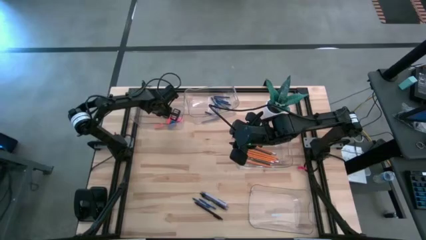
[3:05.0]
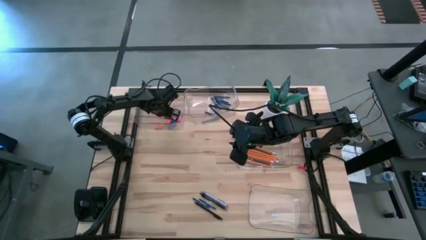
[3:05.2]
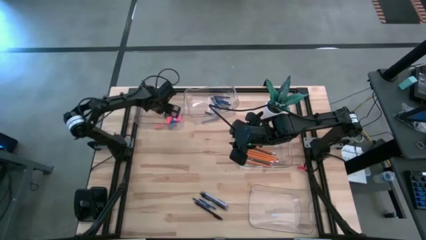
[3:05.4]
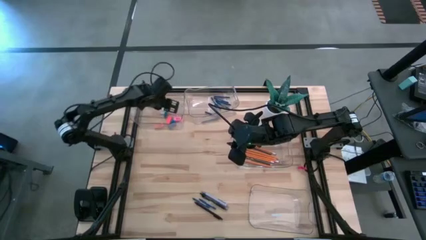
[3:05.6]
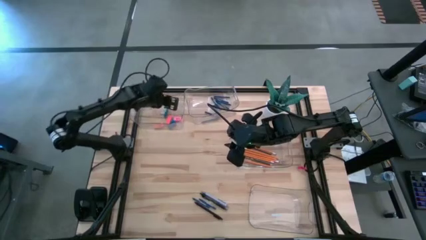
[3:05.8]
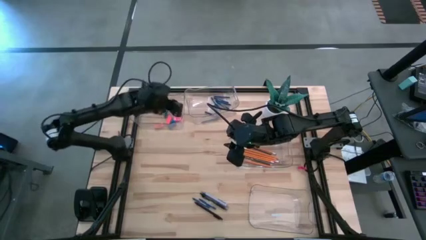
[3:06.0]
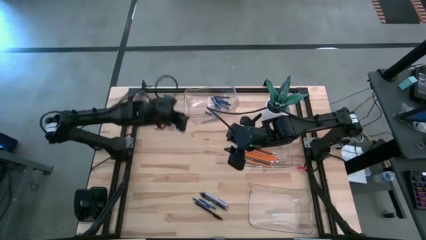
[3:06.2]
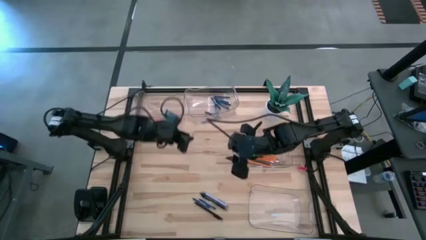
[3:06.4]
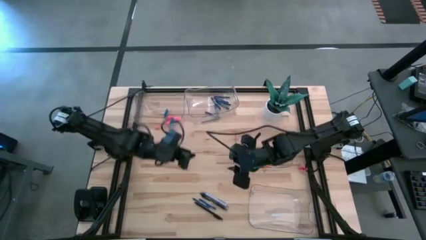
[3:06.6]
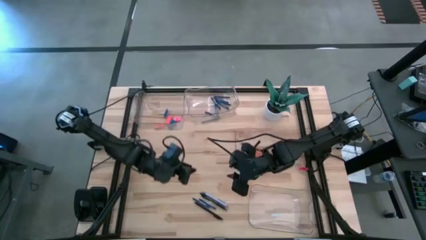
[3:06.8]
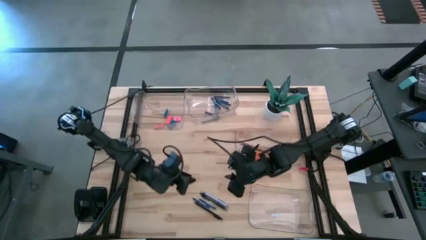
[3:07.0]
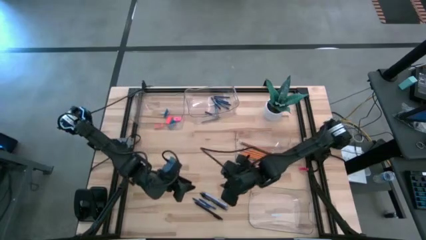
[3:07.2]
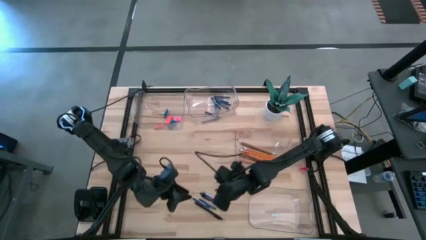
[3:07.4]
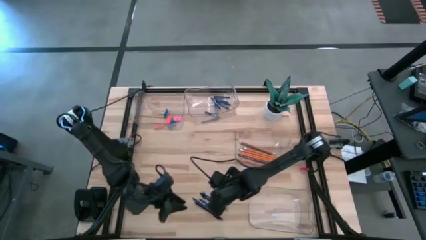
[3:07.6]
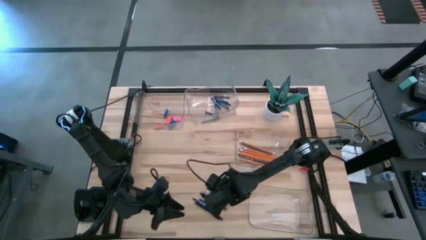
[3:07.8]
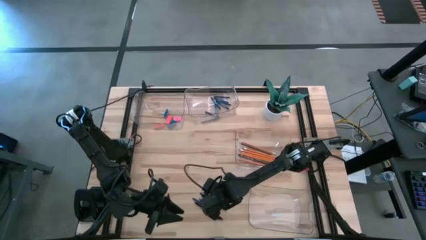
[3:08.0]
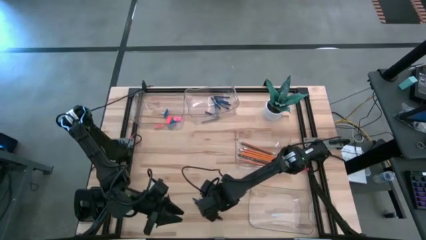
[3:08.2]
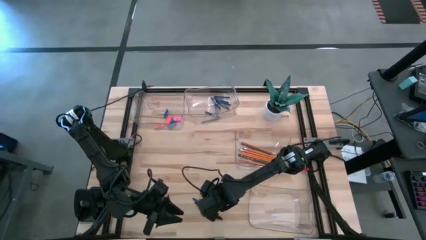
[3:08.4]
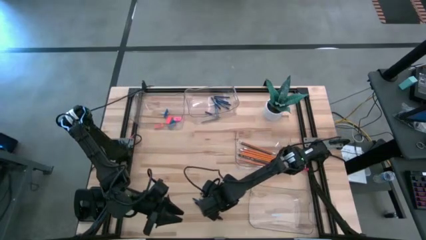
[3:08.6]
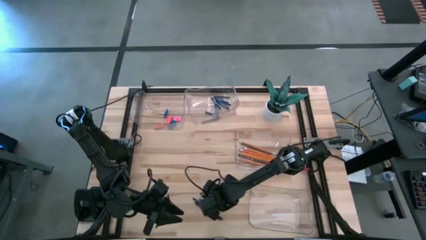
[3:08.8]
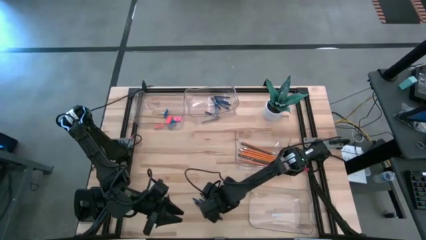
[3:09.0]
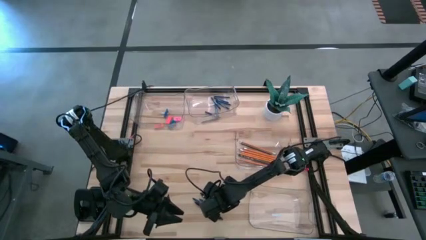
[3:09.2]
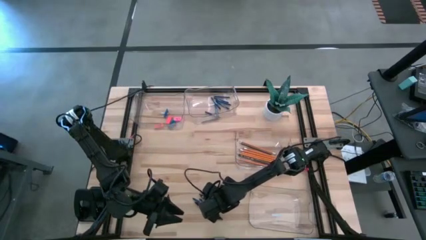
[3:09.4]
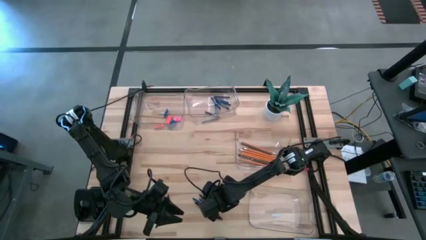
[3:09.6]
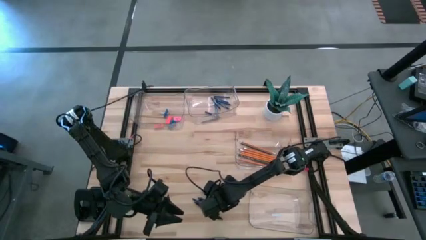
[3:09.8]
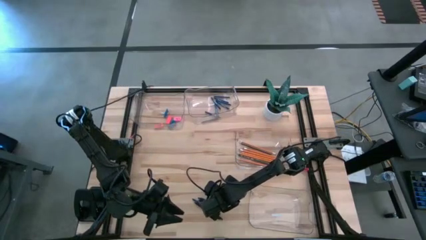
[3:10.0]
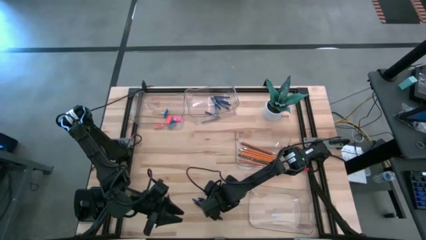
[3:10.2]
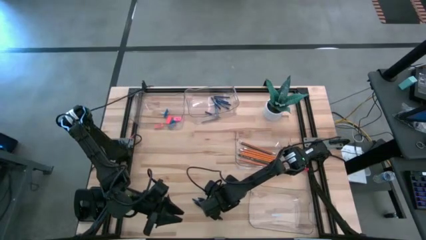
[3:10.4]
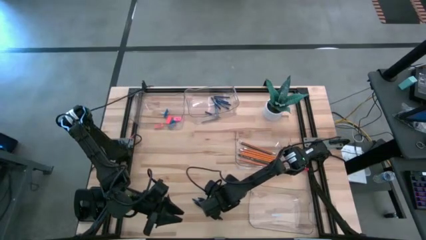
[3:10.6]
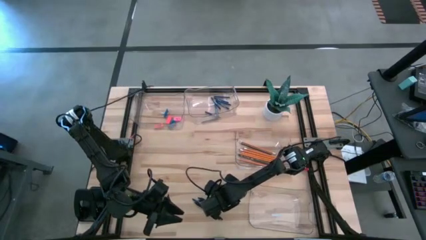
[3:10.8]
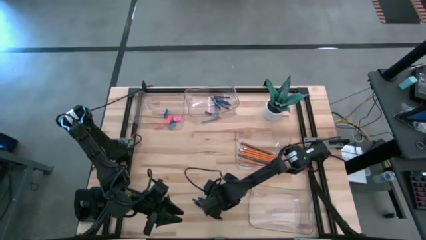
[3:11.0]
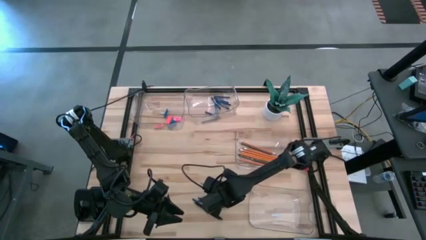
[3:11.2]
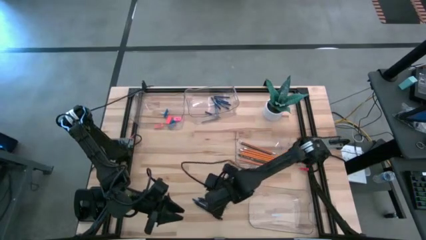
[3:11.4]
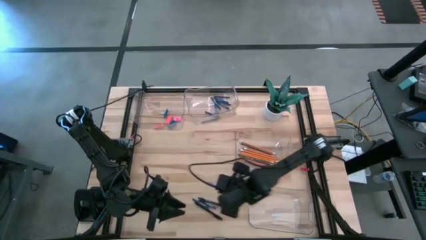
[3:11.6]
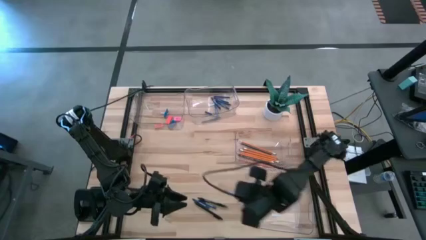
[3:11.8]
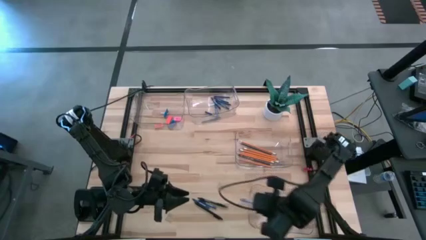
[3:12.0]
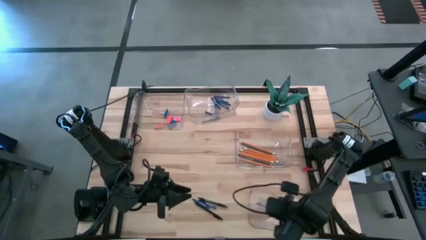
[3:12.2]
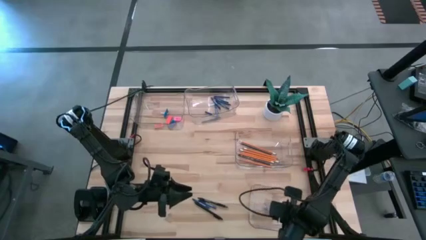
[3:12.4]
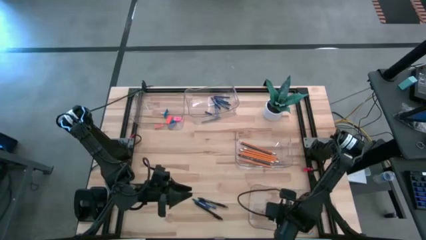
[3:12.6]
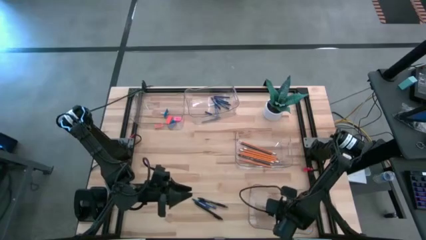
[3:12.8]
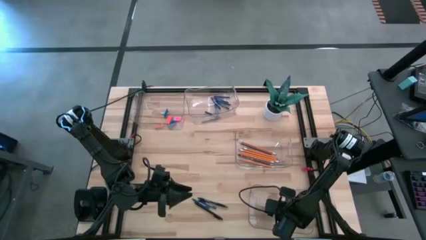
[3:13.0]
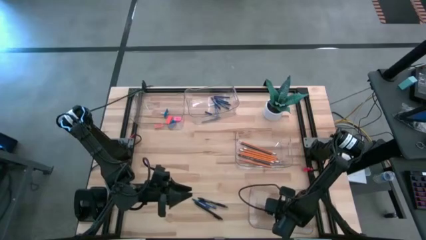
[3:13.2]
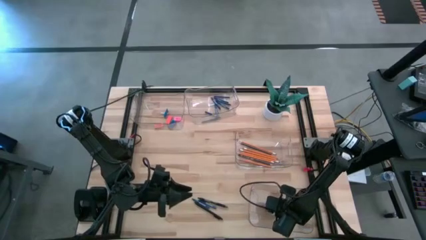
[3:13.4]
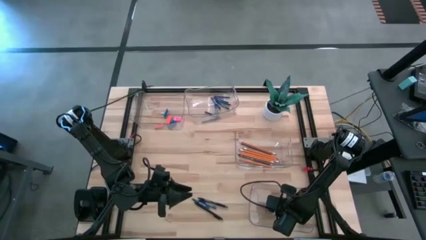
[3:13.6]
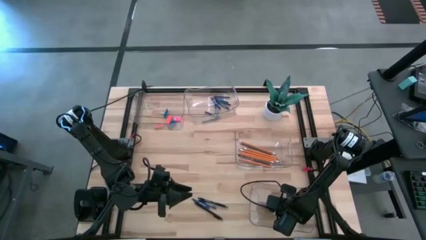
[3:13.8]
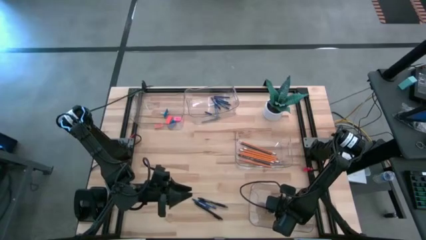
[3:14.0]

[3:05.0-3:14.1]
Task: Sort crayons/erasers/pens/pencils in bins
Put the white pen into the bottom transparent bin

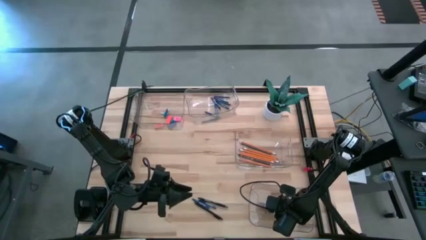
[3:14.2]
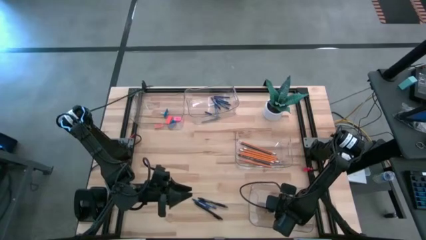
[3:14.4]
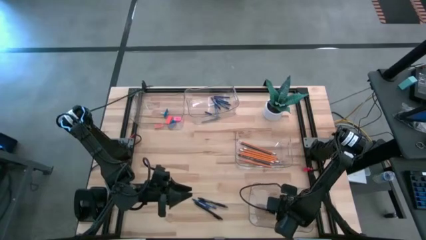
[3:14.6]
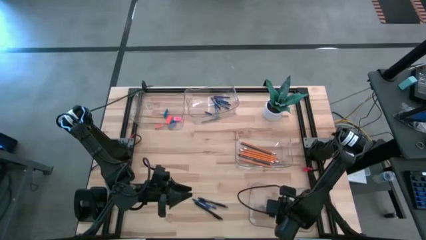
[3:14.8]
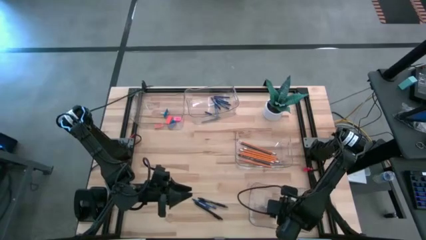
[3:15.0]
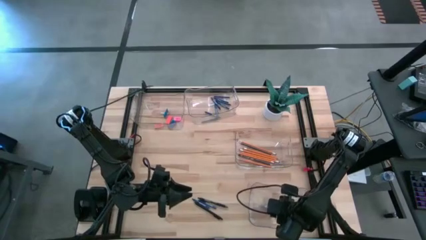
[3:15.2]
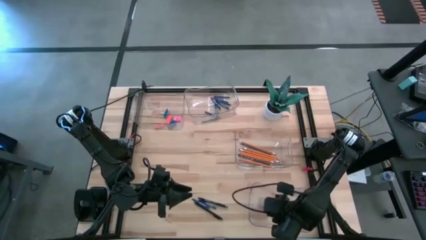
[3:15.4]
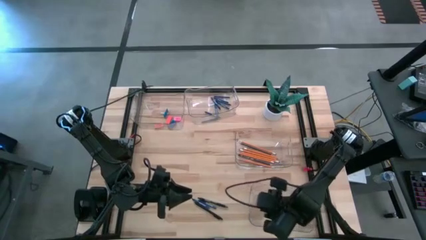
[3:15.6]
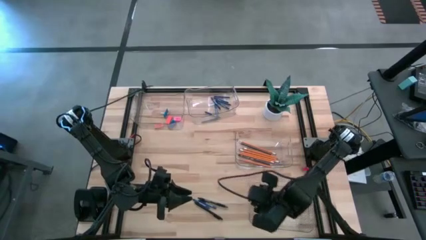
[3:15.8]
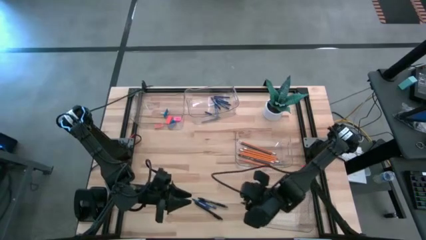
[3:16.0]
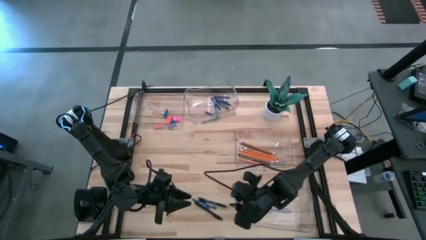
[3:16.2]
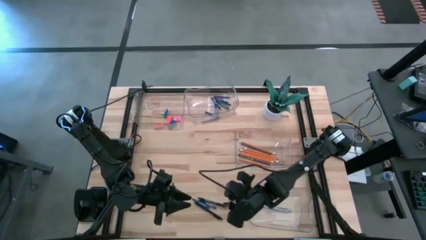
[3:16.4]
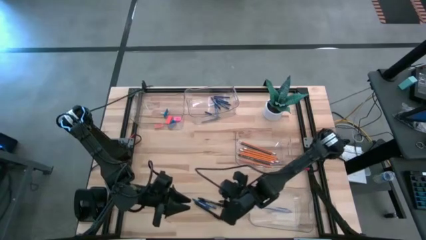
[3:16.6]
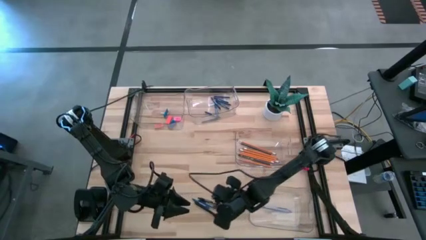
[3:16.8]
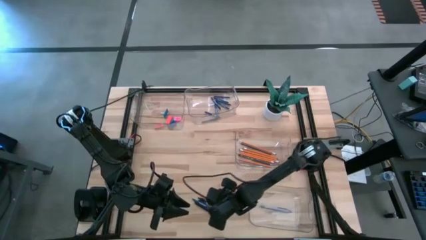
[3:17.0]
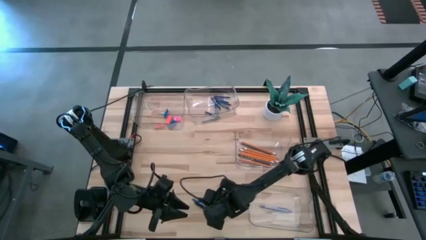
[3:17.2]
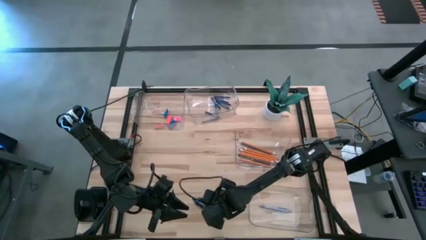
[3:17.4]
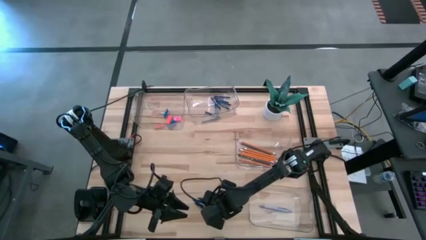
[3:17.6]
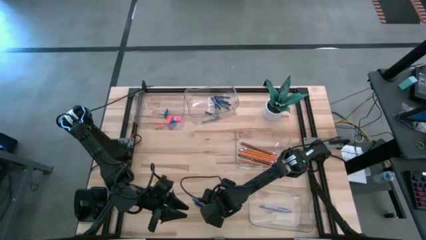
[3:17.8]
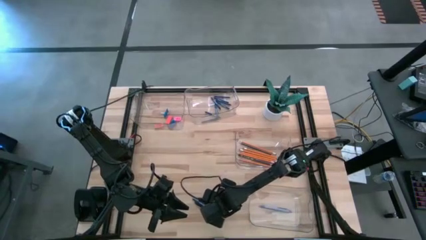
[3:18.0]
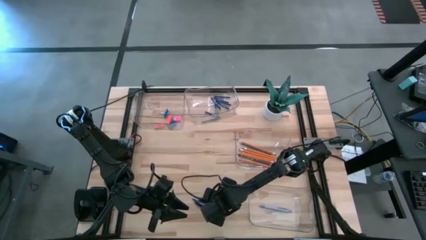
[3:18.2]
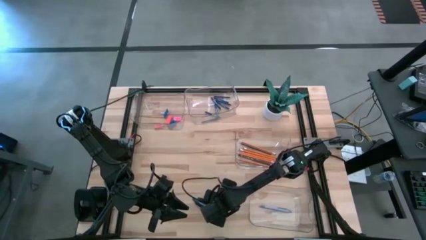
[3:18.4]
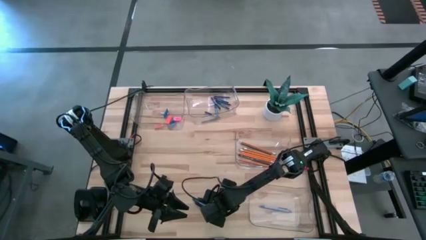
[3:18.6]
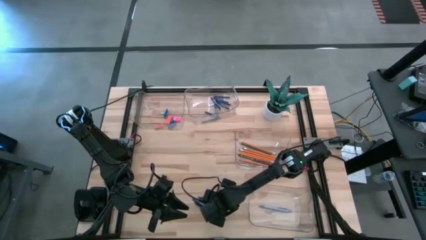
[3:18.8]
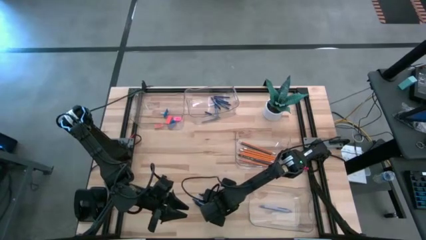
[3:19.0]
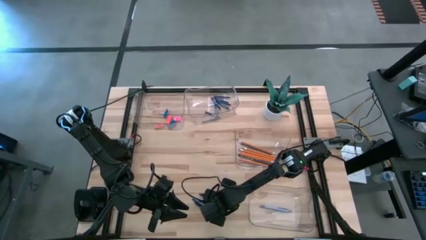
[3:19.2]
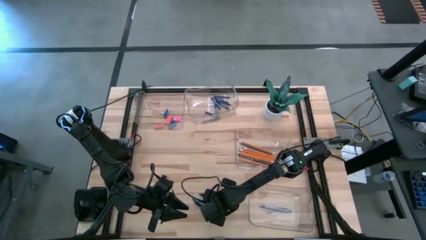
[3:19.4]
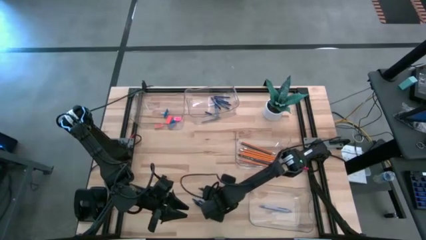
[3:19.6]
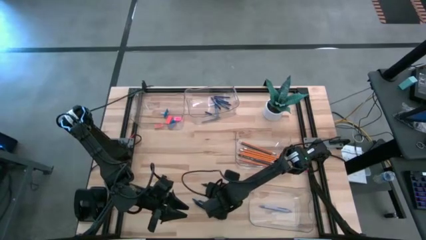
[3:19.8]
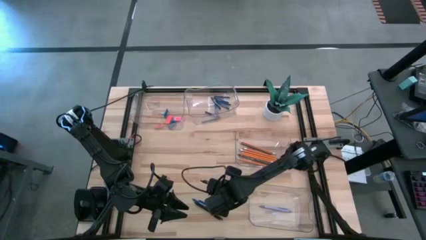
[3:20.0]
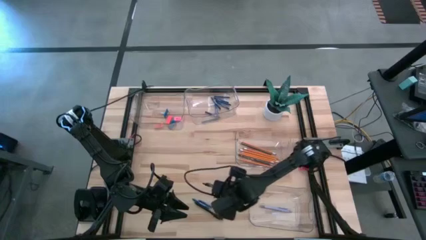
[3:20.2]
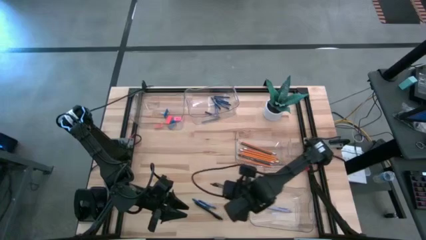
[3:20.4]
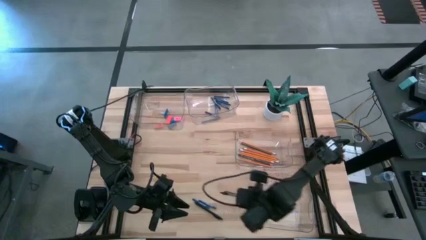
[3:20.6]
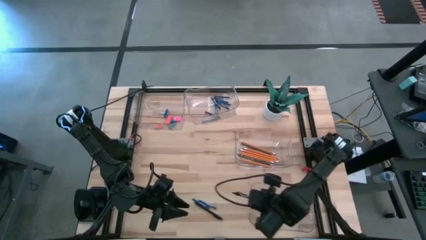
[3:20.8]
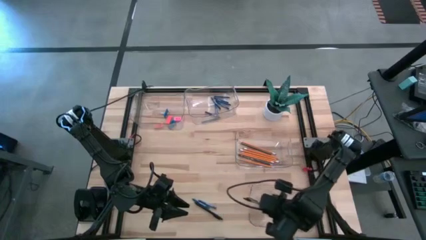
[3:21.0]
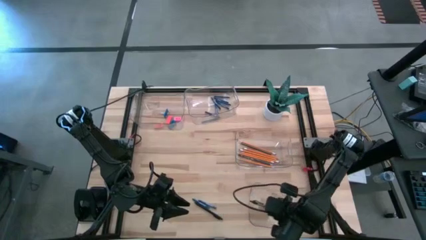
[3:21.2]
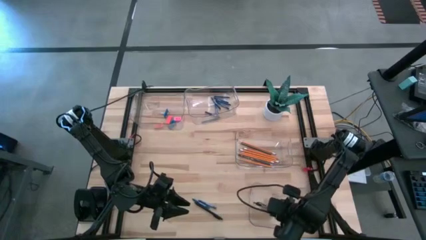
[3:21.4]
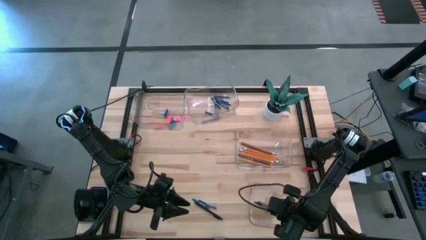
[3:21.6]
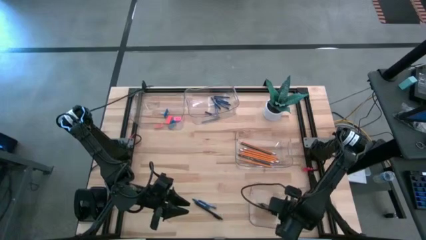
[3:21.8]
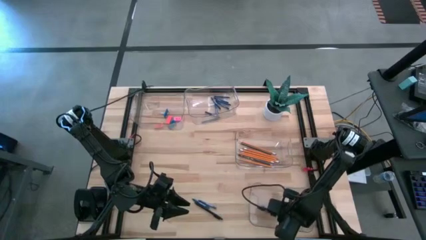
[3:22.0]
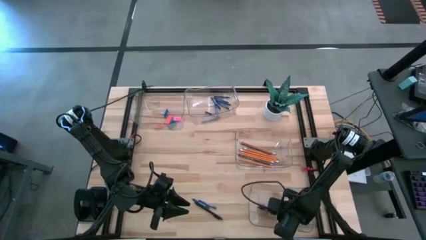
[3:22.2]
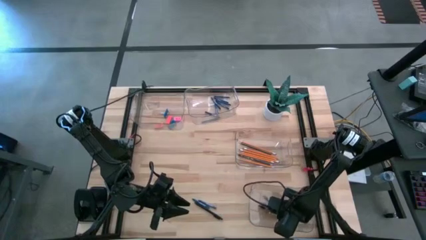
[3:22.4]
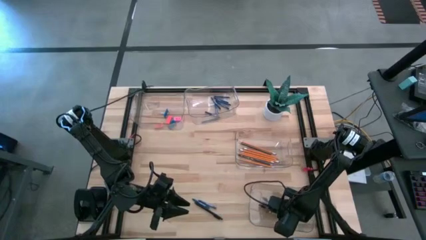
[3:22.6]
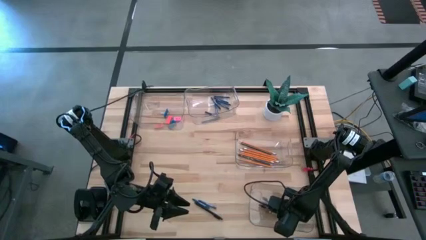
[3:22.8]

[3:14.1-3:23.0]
Put the black pen into the bottom transparent bin
